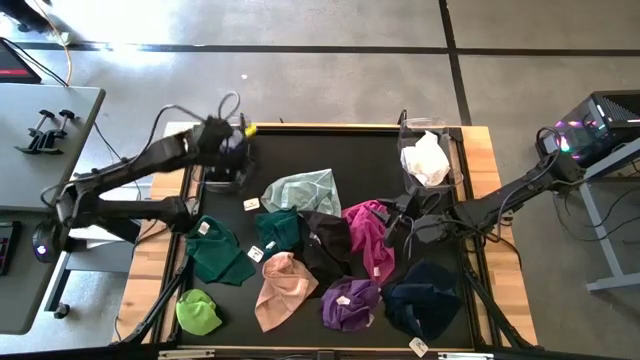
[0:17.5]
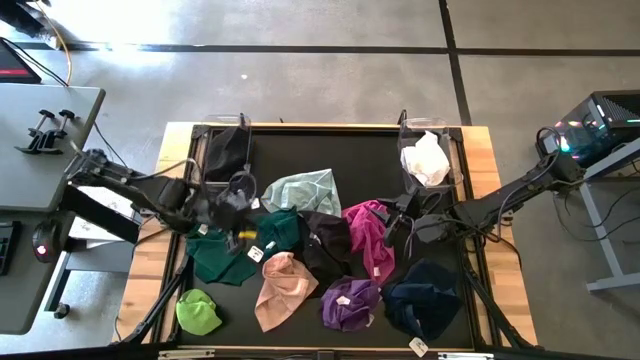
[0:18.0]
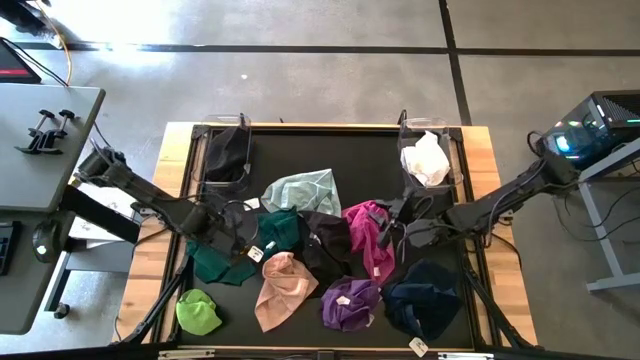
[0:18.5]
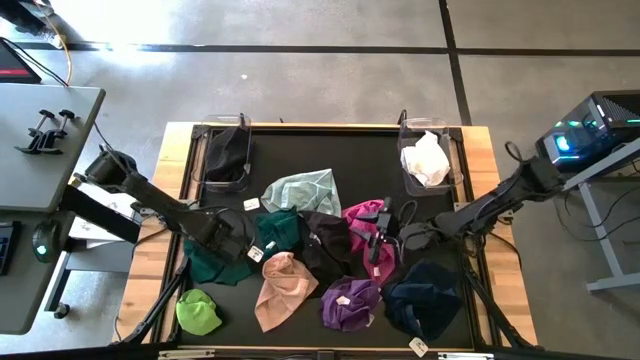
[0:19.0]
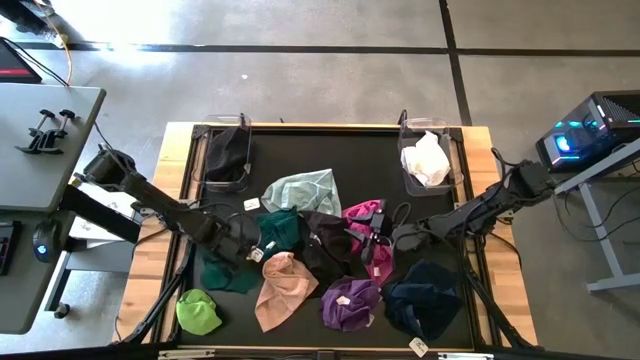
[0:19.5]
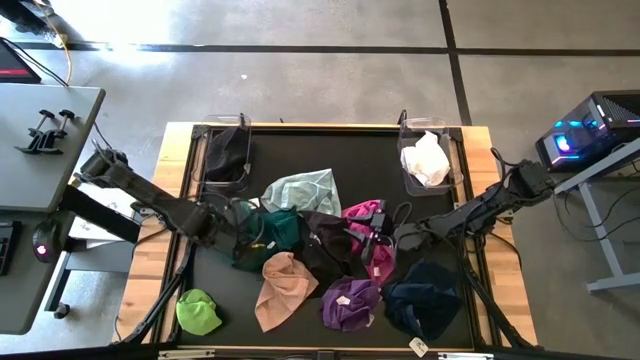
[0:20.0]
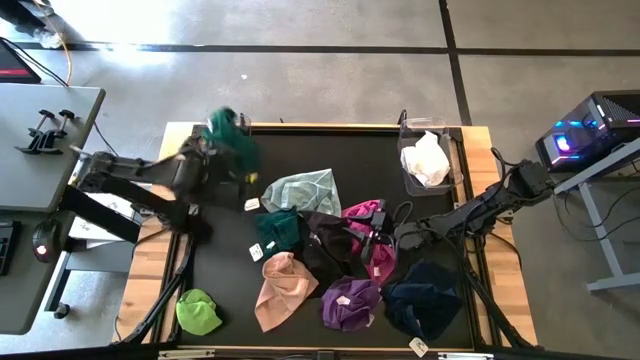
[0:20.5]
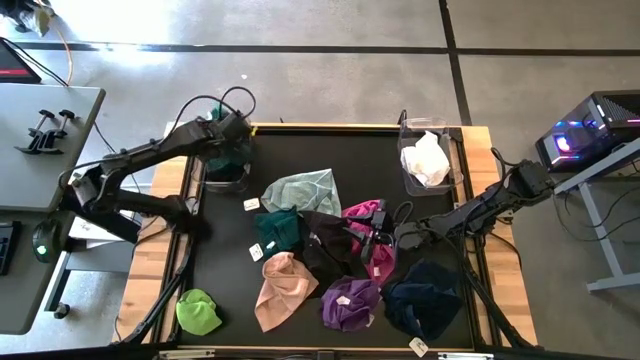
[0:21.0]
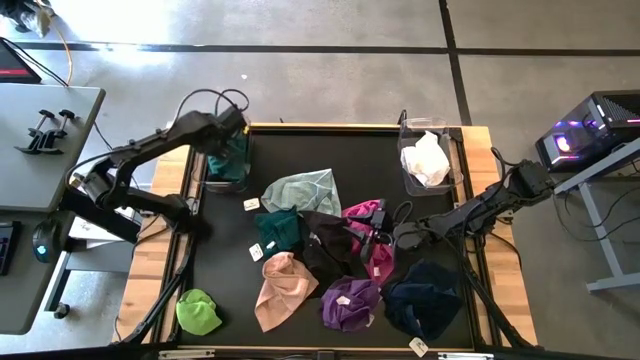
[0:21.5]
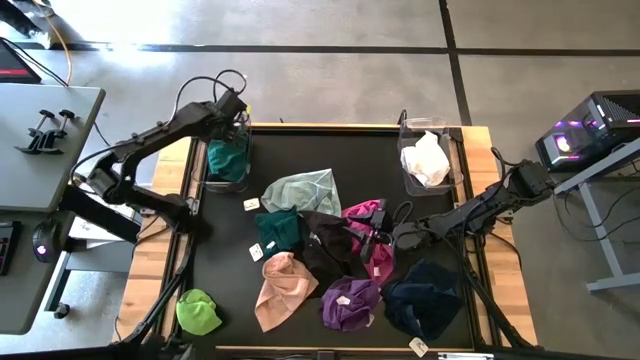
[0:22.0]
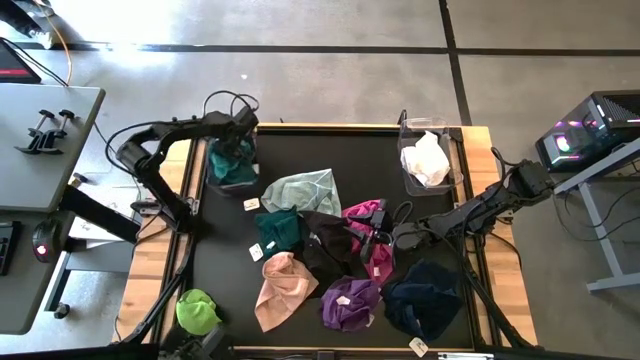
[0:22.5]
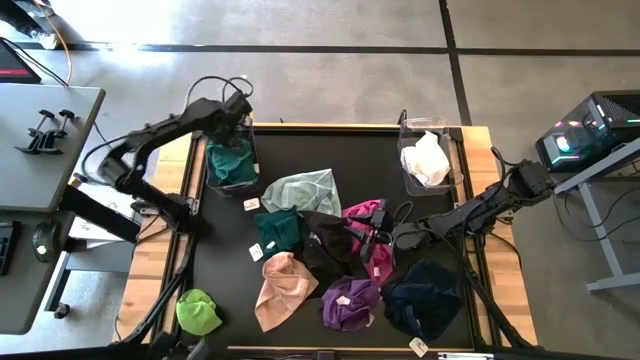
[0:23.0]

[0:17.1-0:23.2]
Task: Sort towels by color in basket
Put the left dark green microfiber cloth into the left transparent bin

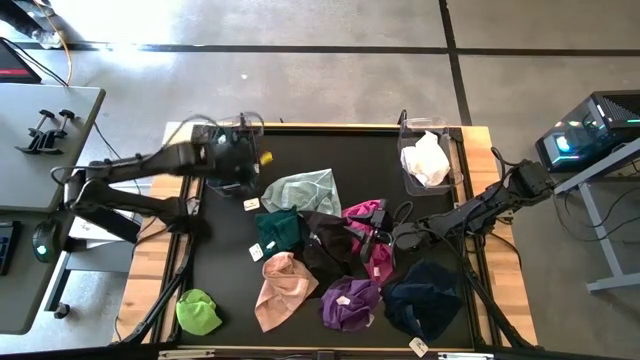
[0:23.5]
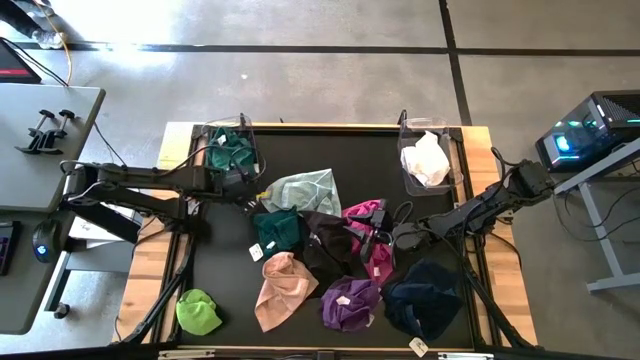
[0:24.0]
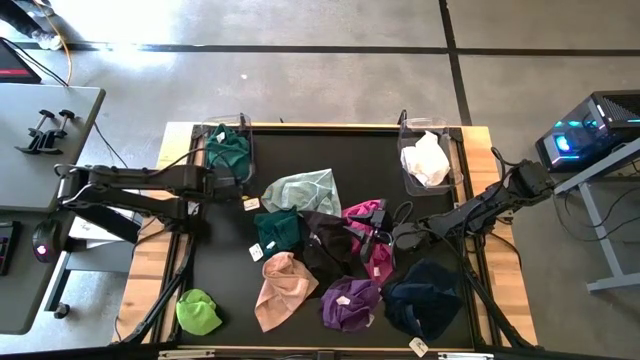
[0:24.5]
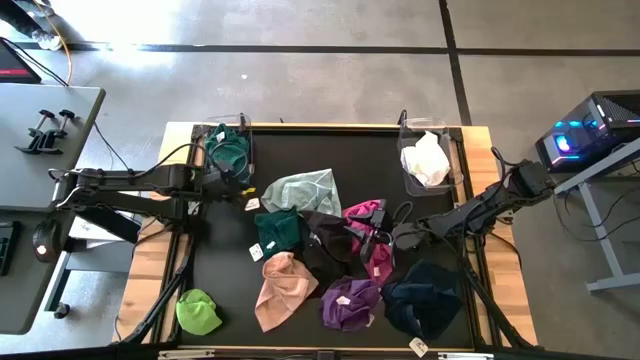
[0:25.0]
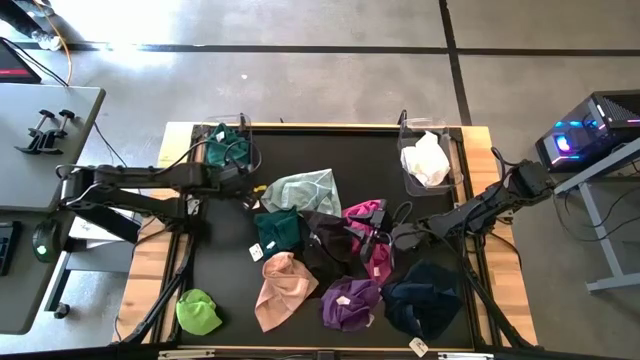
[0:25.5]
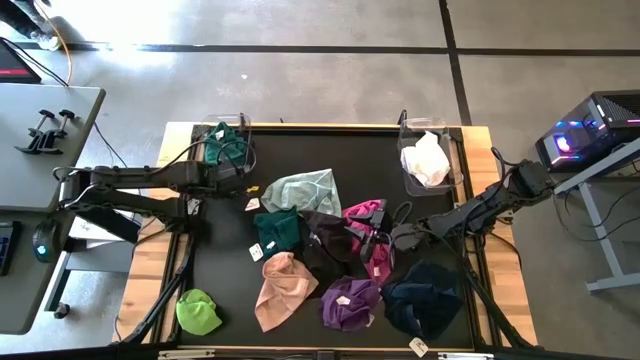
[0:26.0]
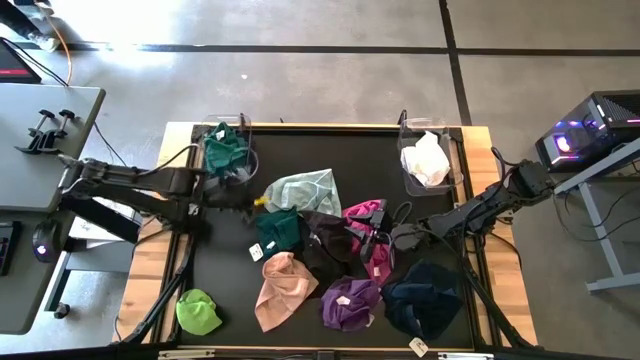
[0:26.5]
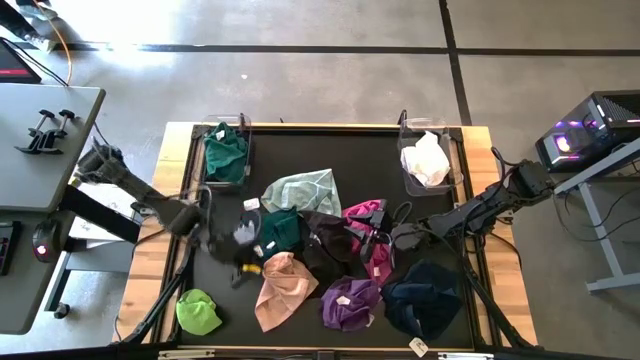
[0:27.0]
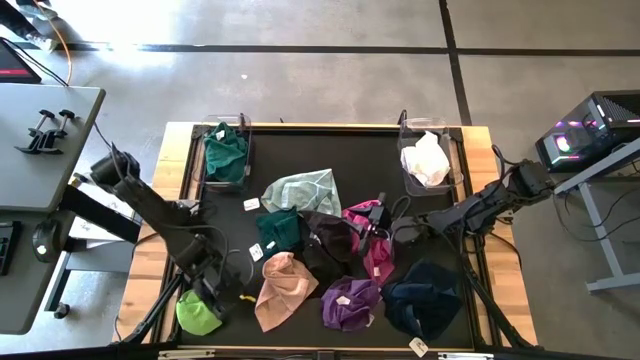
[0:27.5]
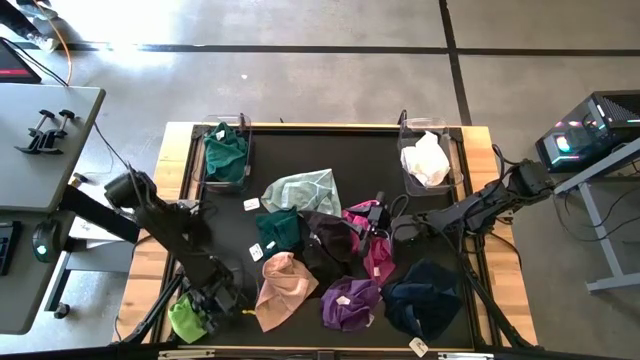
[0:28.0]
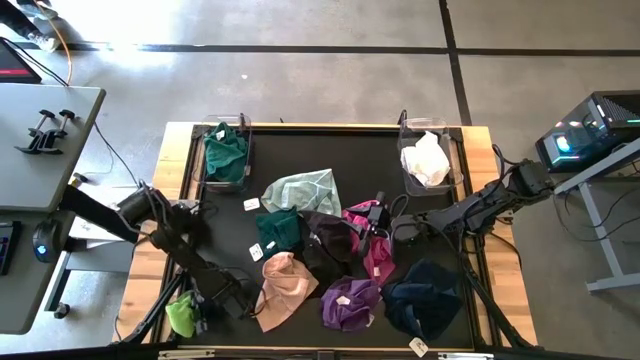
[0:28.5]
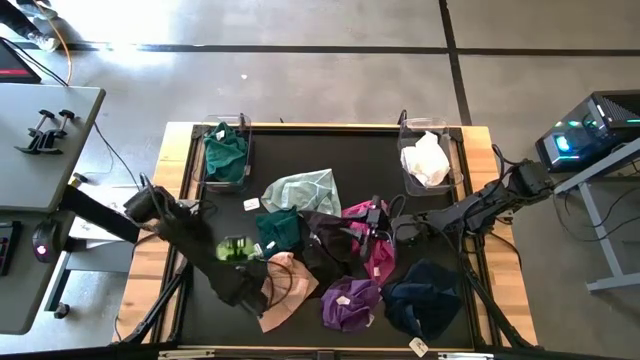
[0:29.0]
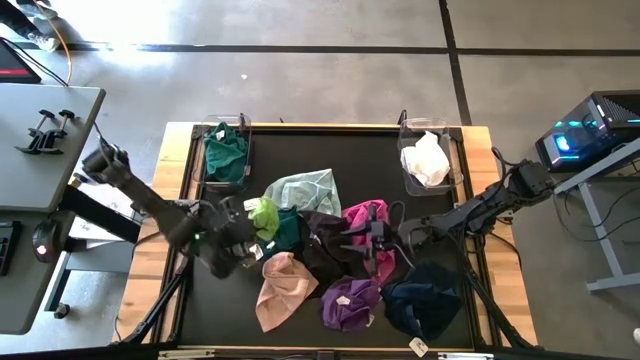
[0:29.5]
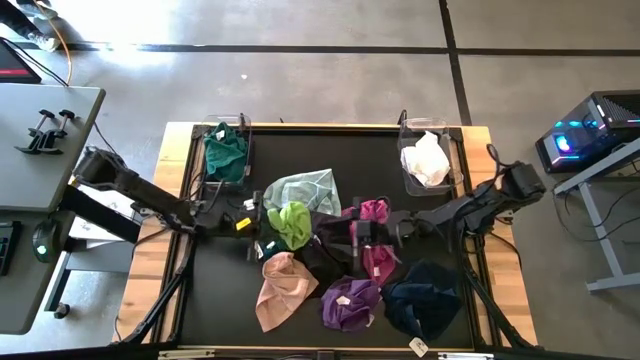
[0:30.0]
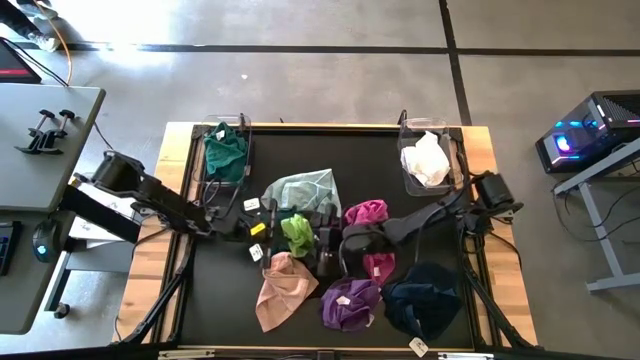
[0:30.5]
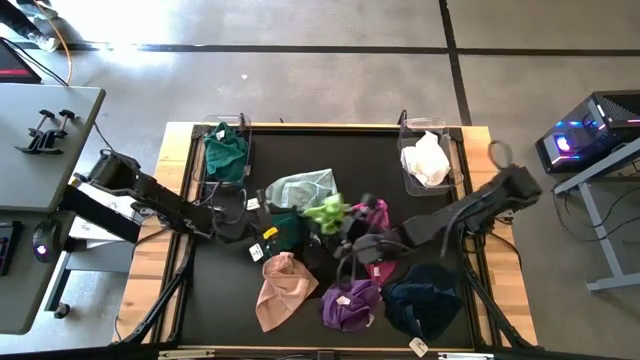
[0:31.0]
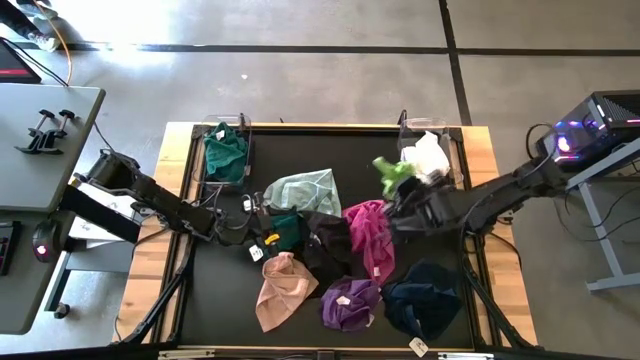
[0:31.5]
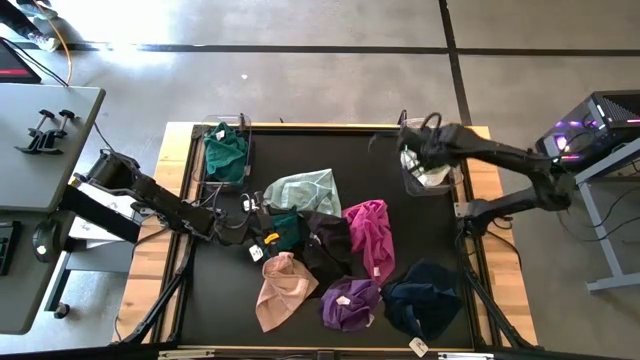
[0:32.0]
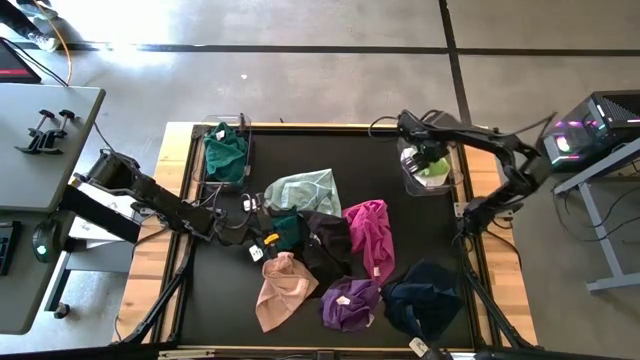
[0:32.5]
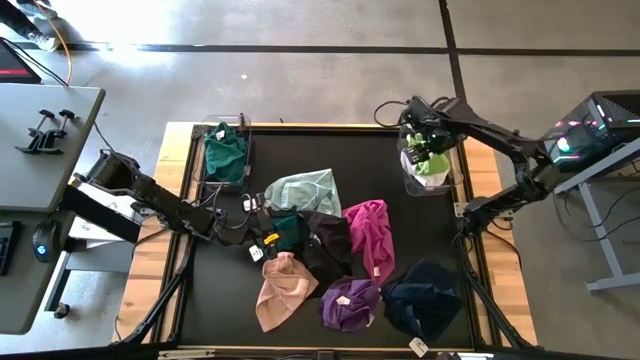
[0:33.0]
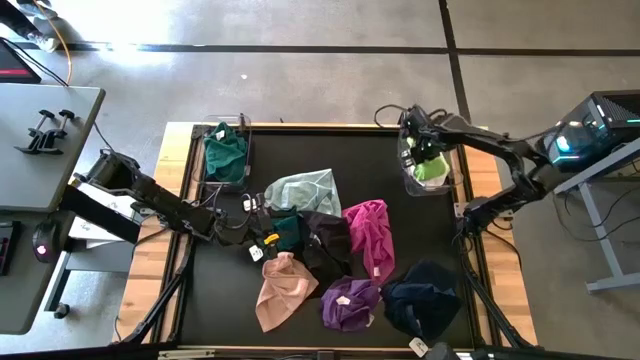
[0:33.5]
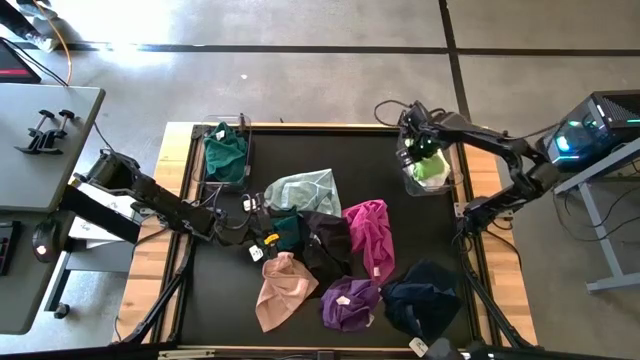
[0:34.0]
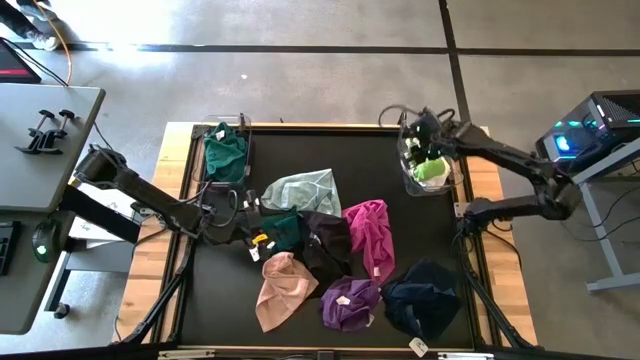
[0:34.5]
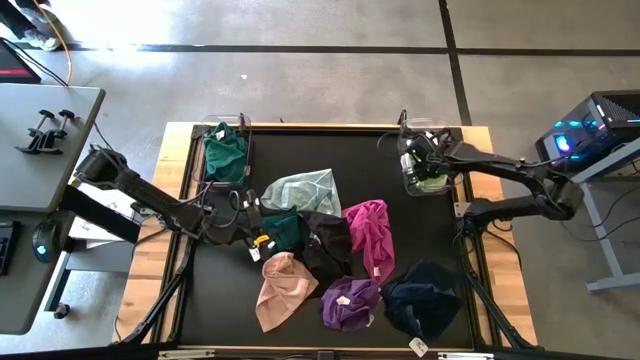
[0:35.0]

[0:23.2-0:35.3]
Put the light green microfiber cloth into the right transparent bin

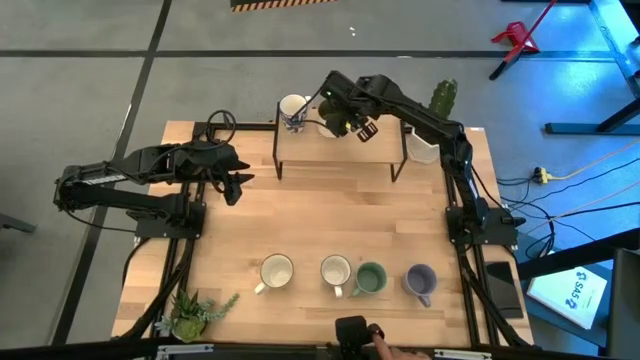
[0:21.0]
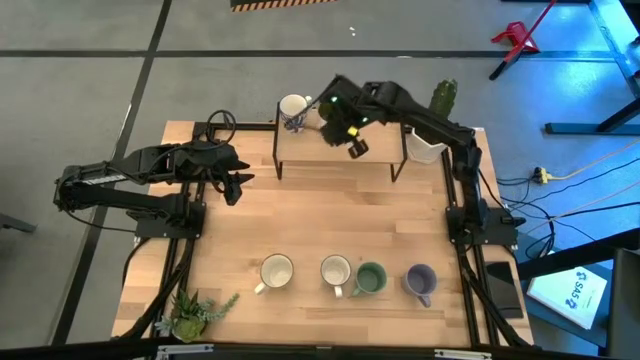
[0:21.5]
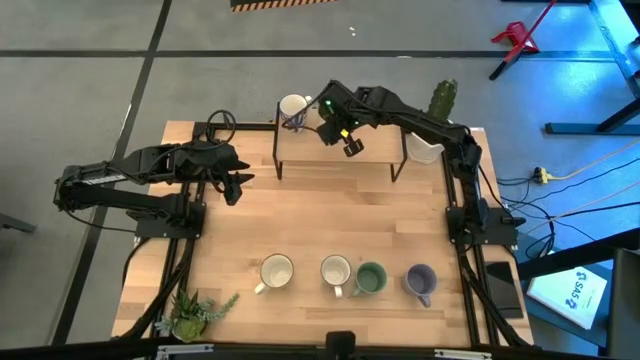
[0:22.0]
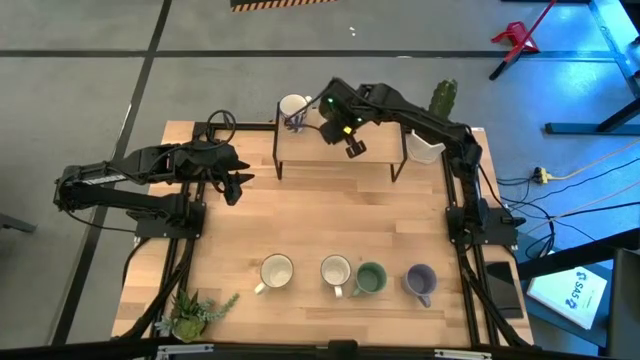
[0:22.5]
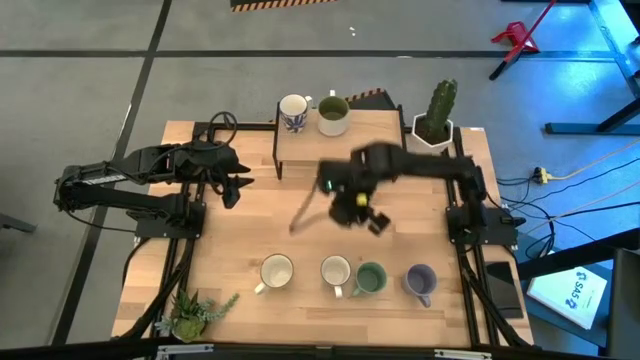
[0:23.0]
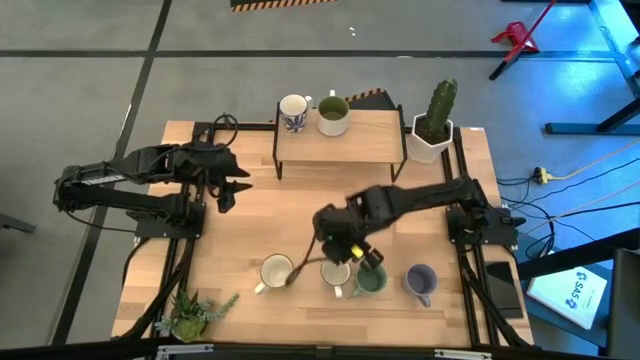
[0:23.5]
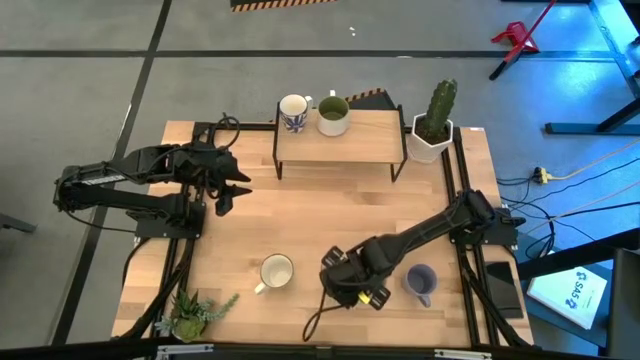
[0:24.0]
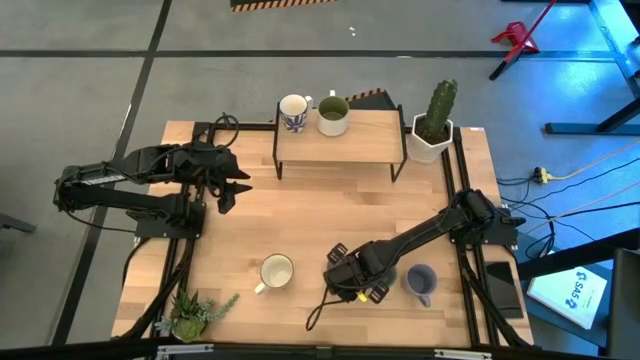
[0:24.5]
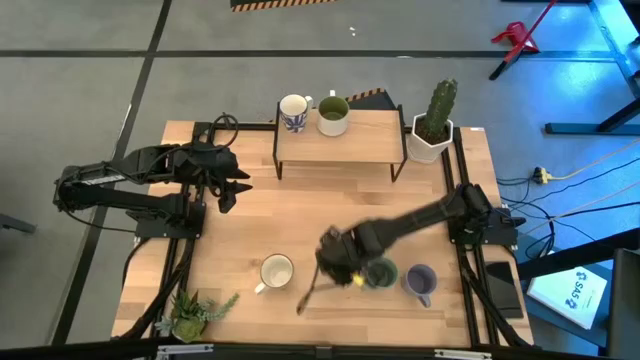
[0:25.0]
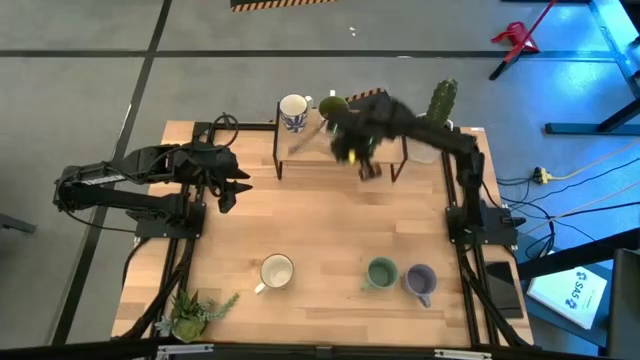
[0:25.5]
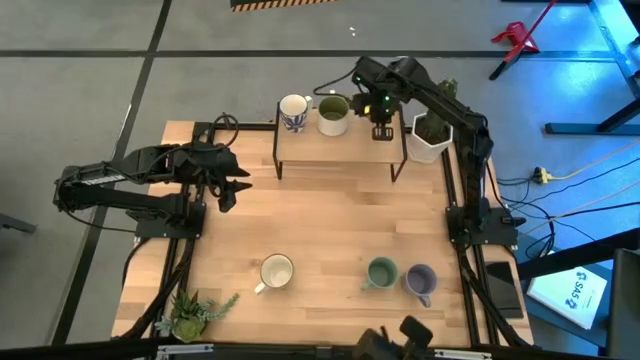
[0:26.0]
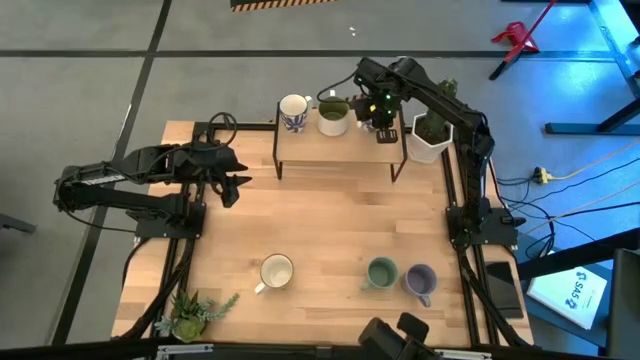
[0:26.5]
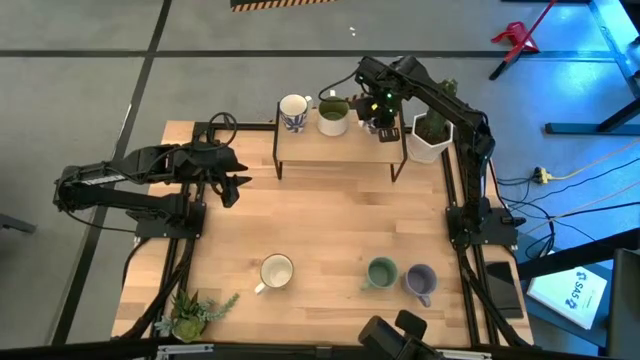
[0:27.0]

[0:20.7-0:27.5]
Task: Place coffee mugs
Put the blue patterned mug on the shelf
